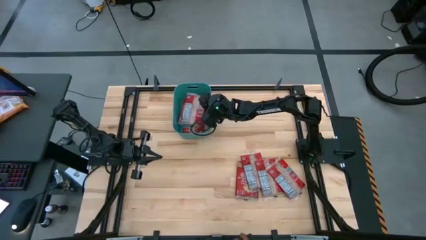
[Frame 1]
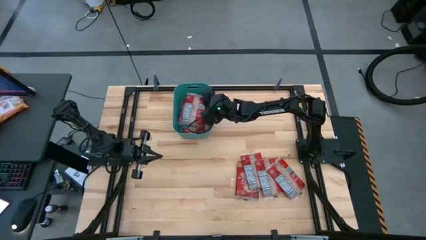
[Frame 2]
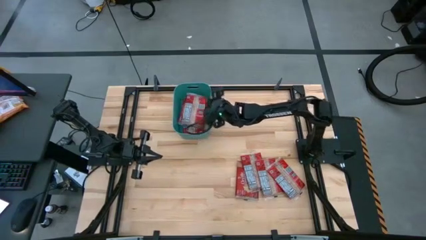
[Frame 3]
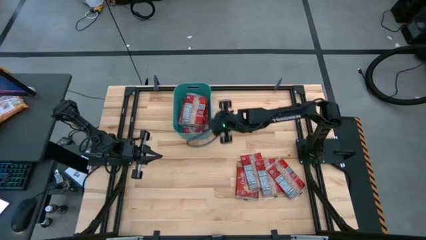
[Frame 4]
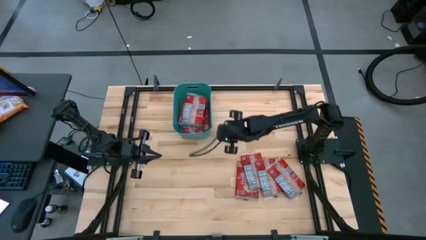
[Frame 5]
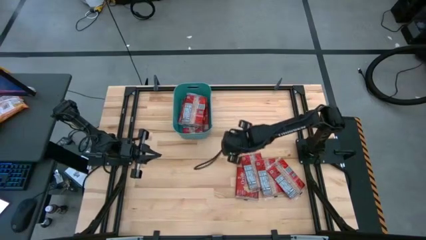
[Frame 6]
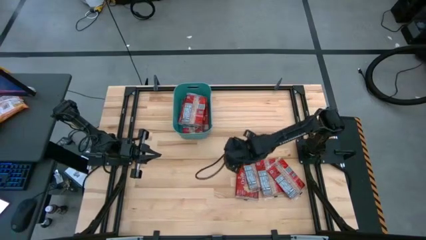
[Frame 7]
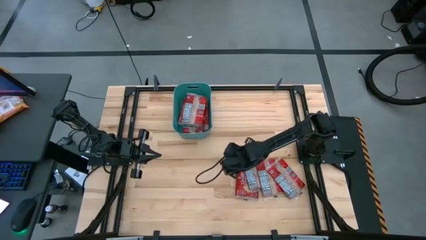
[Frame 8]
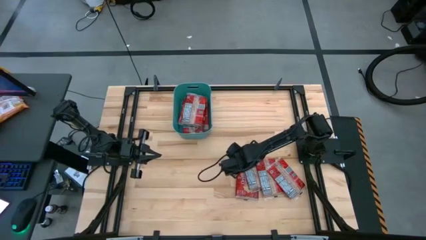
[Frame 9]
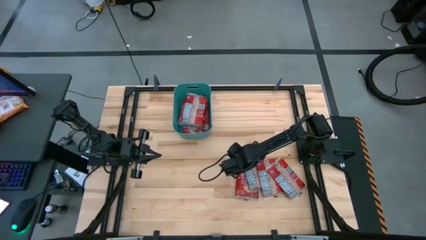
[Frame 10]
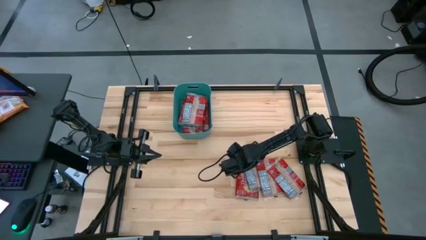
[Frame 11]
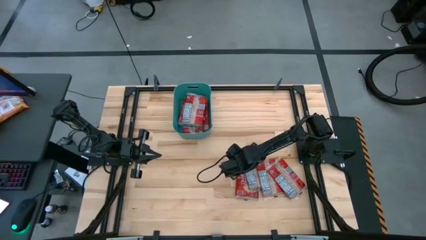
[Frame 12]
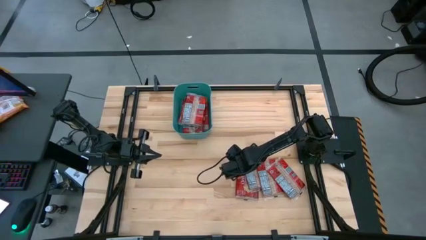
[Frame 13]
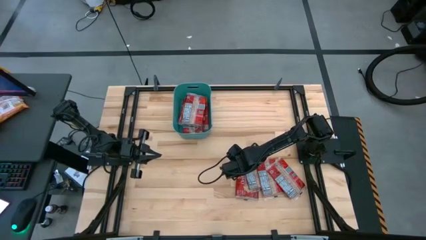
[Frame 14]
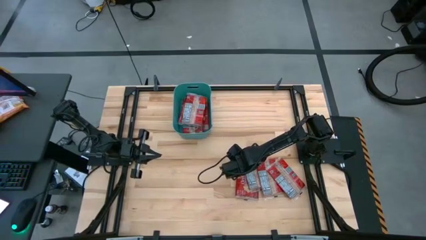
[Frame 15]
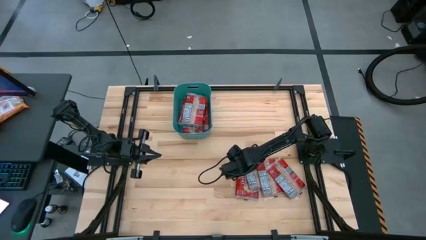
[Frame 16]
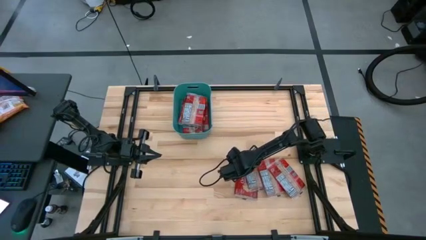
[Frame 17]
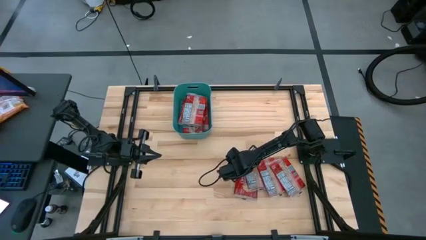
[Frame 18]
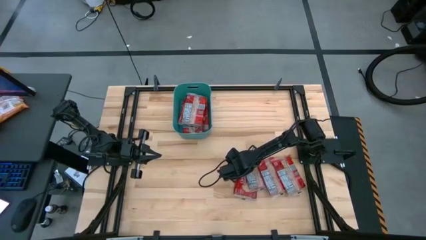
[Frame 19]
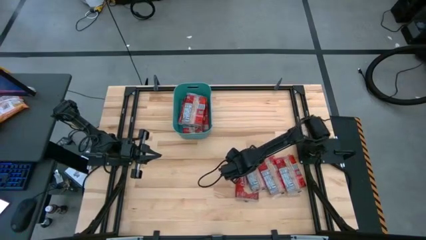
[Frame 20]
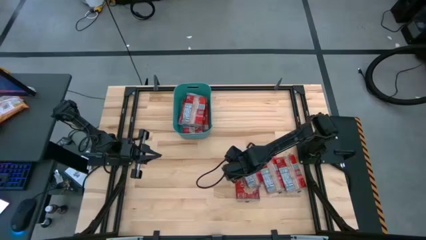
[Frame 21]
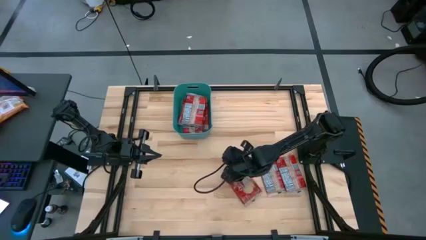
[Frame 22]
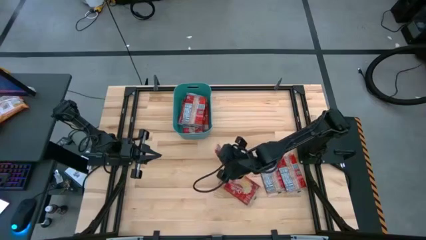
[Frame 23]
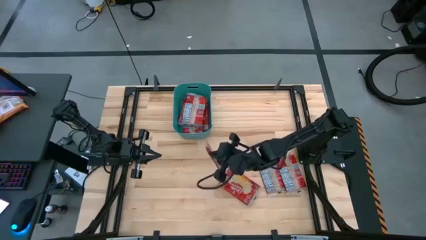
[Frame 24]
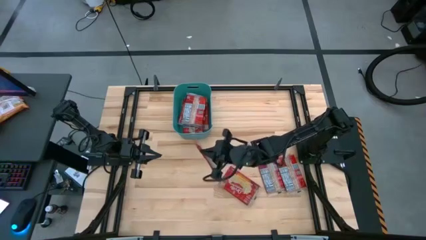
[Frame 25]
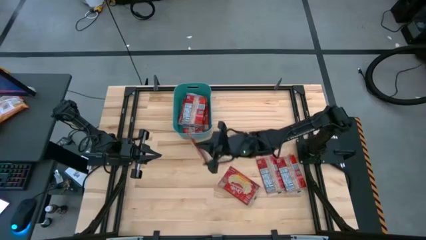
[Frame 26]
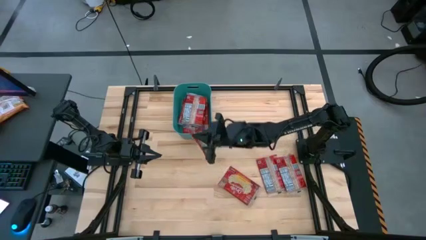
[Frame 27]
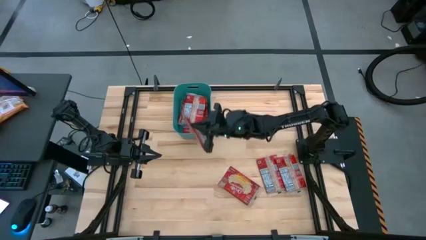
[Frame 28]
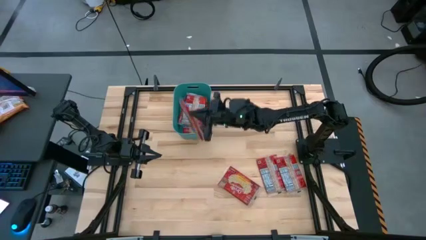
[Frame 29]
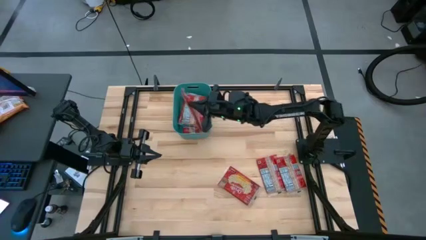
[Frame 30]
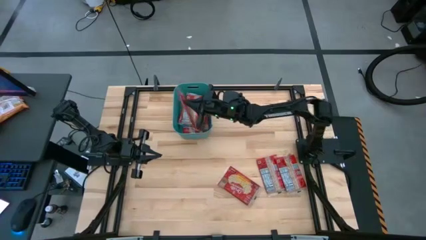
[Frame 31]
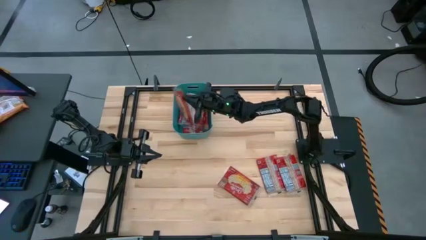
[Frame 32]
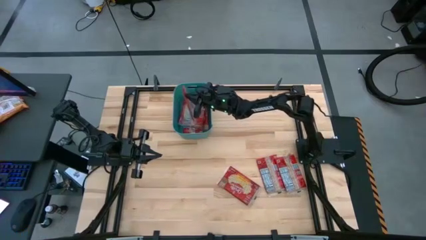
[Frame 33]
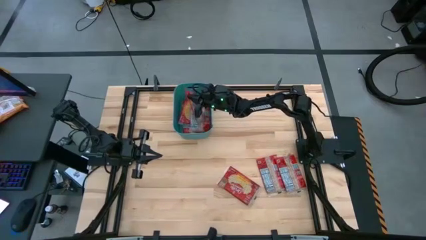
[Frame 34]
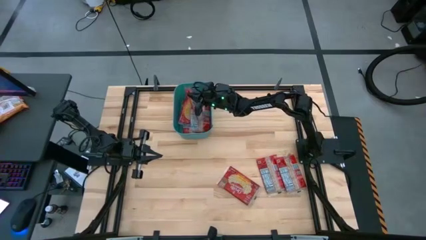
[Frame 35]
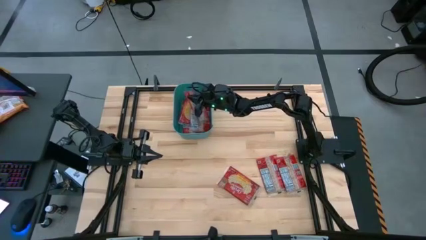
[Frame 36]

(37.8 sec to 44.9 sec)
Task: Sort popcorn bags into baskets
Put the red popcorn bag into the green bin

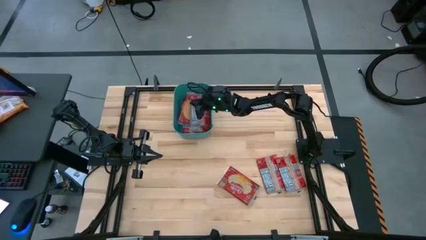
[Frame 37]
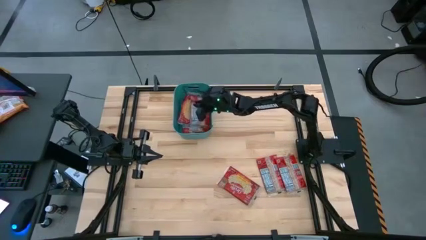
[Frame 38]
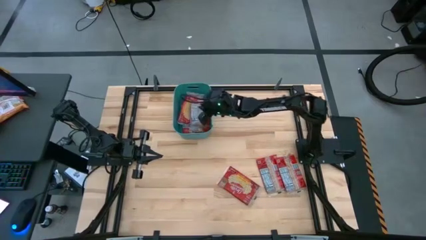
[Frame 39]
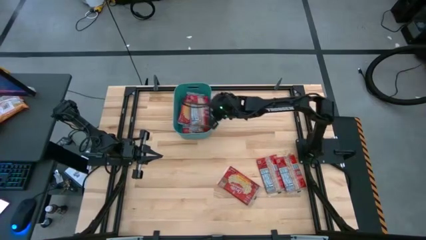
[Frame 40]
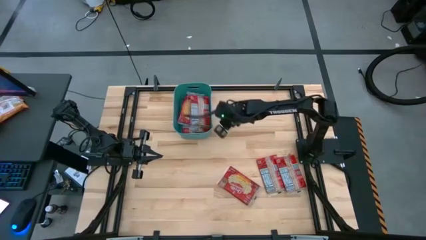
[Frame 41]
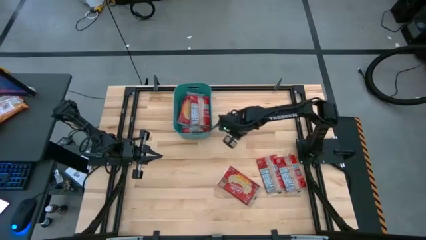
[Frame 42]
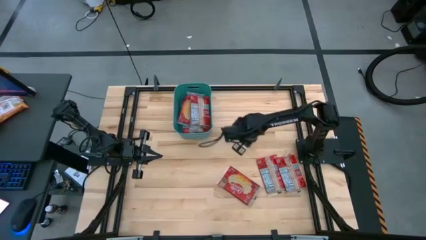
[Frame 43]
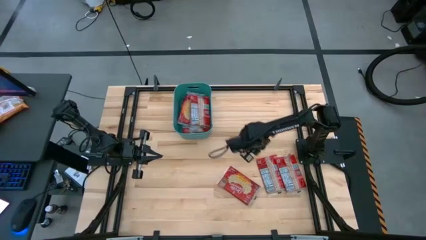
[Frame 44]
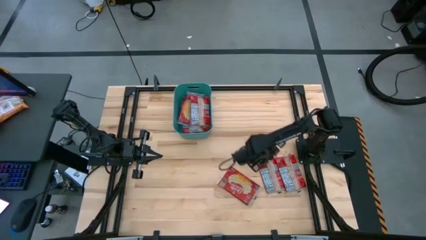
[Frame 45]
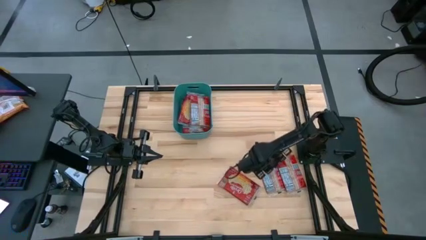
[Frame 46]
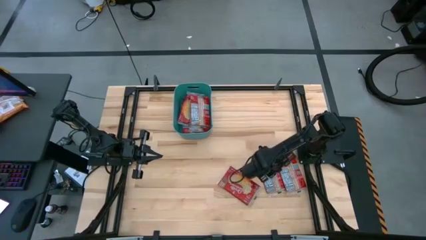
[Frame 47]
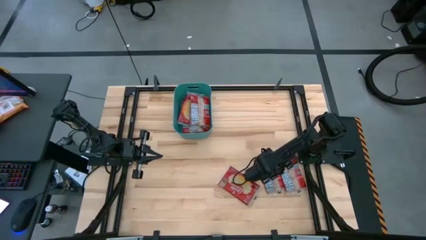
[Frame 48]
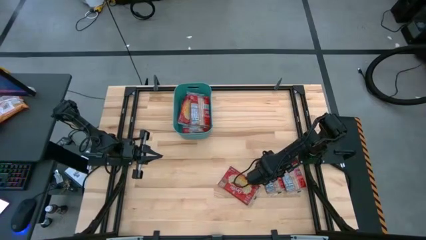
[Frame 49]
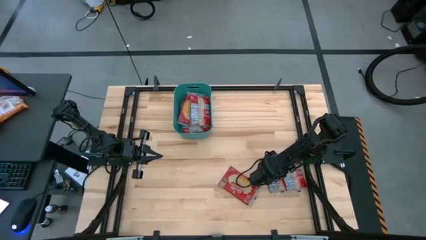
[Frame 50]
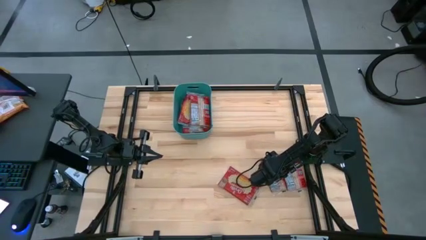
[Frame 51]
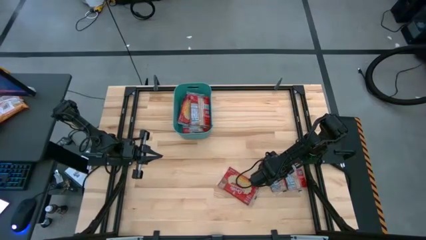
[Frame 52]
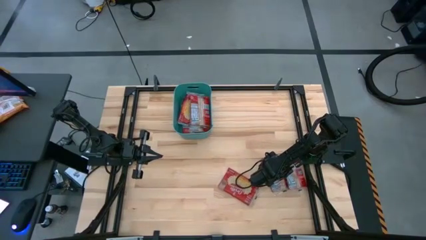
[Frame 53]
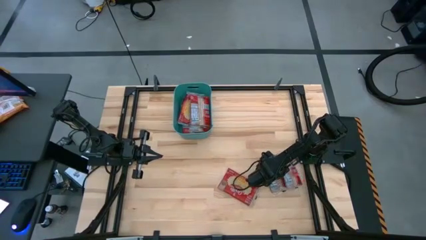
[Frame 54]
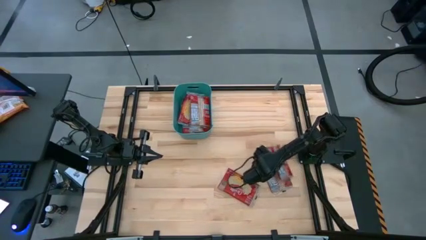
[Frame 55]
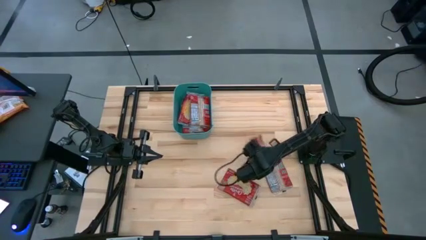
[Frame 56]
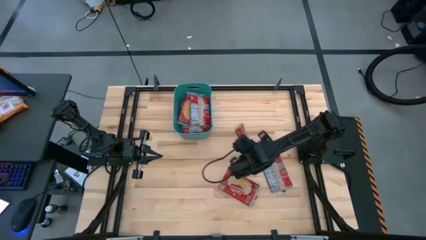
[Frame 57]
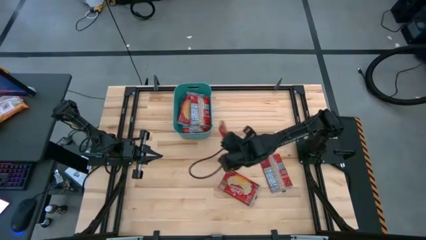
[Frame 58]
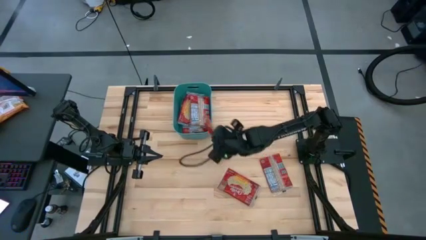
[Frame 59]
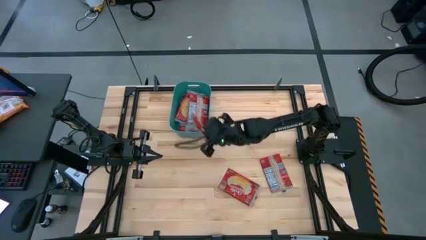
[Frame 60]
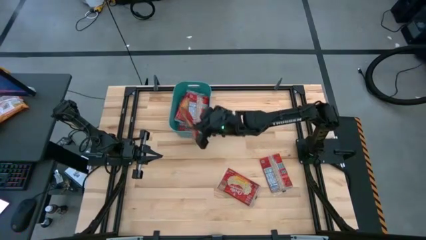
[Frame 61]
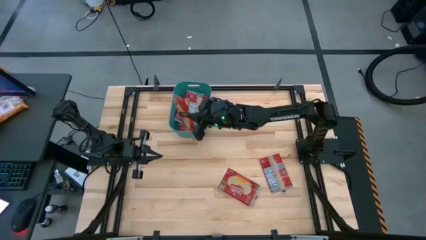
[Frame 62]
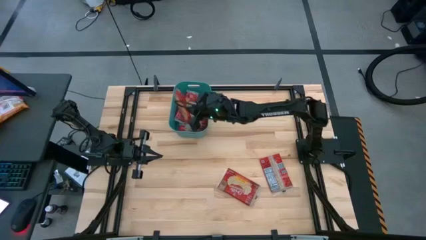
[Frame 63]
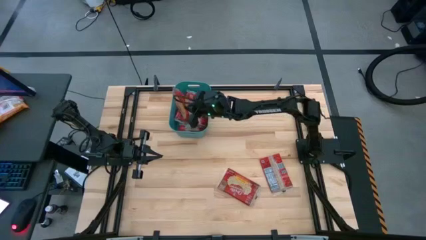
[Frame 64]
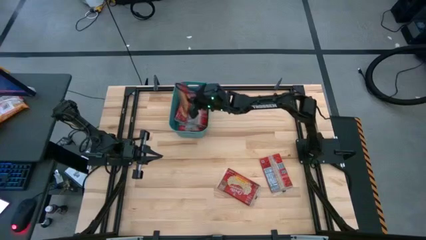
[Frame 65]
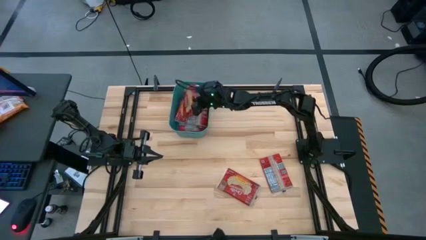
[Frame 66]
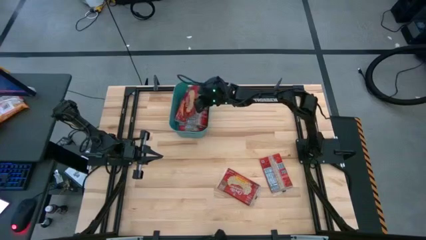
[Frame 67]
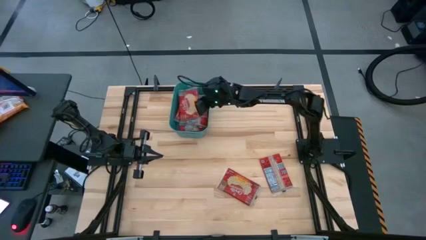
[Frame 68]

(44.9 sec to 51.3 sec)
Put the red popcorn bag into the green bin

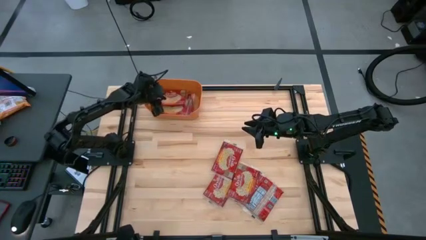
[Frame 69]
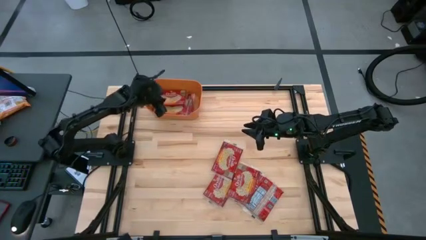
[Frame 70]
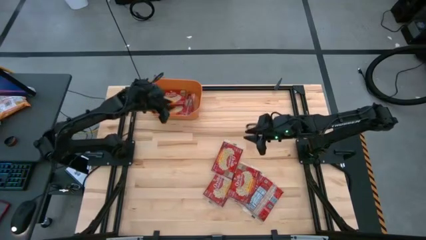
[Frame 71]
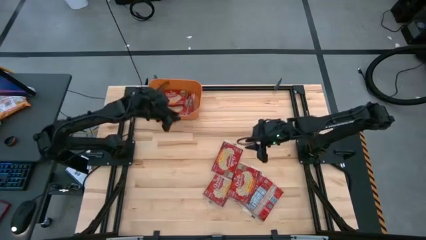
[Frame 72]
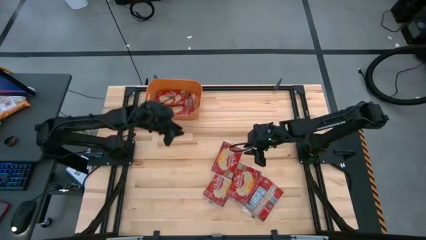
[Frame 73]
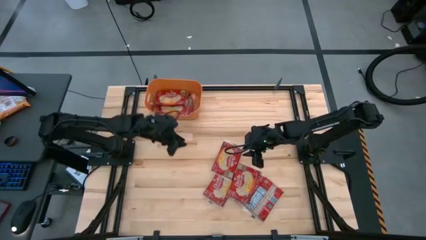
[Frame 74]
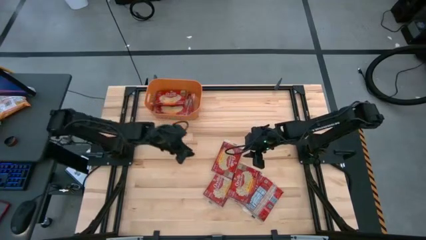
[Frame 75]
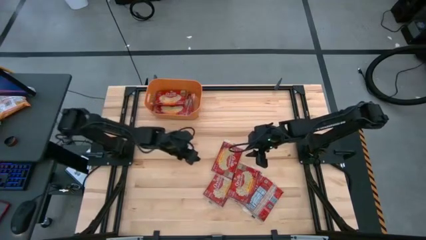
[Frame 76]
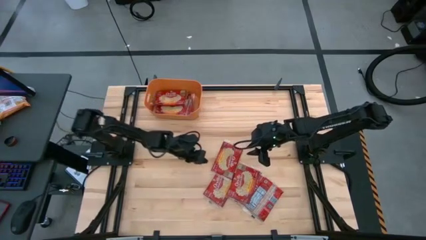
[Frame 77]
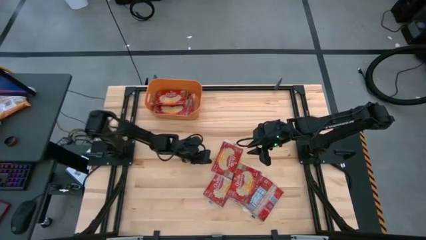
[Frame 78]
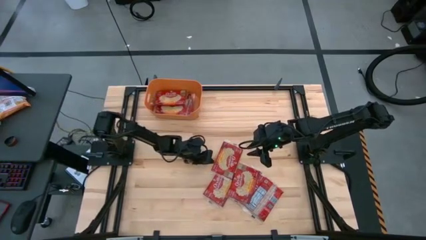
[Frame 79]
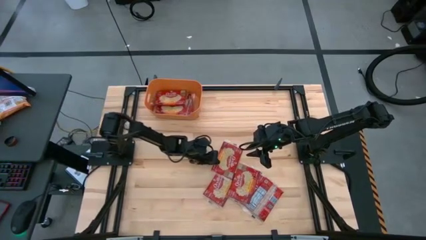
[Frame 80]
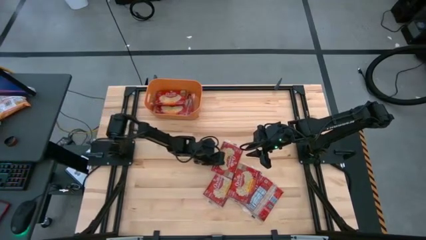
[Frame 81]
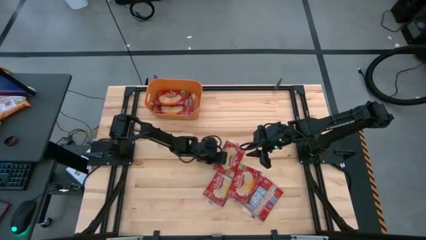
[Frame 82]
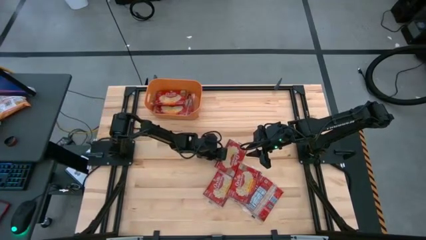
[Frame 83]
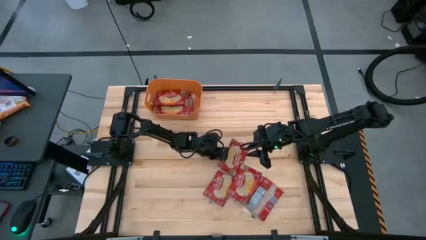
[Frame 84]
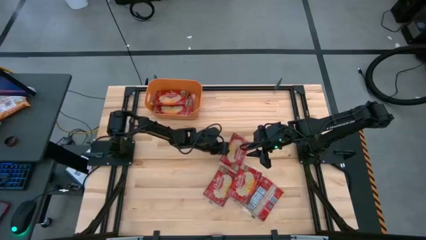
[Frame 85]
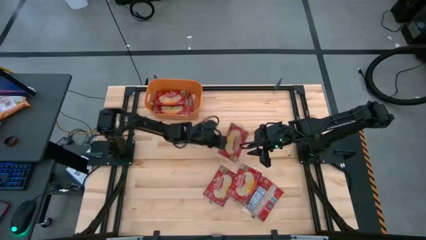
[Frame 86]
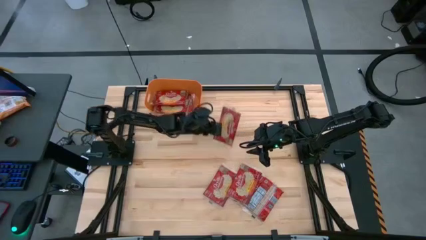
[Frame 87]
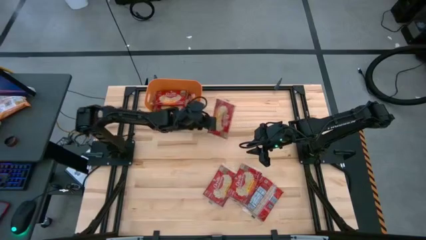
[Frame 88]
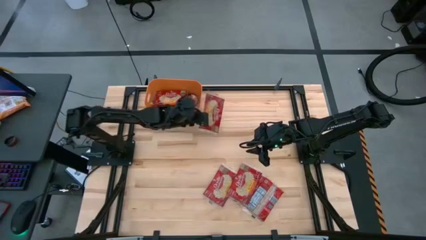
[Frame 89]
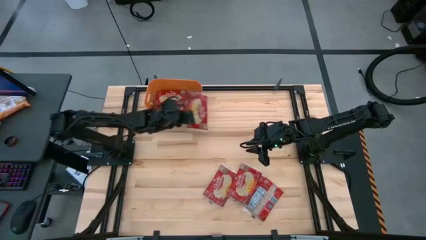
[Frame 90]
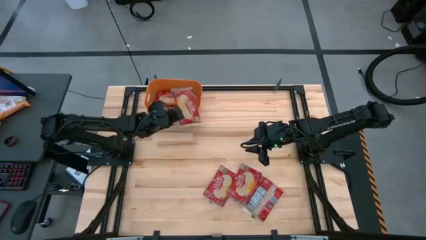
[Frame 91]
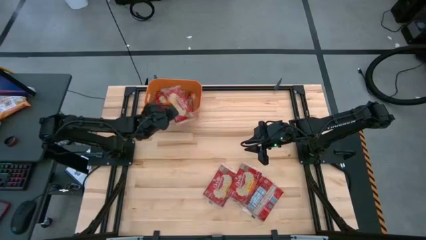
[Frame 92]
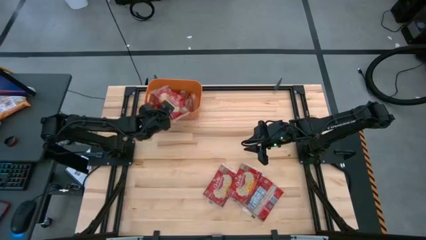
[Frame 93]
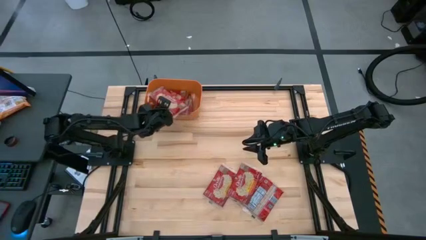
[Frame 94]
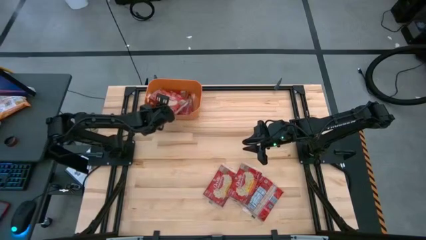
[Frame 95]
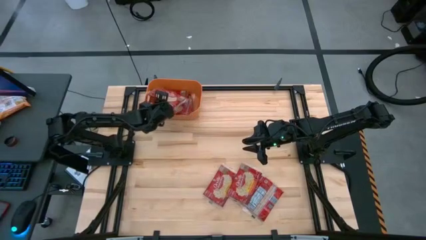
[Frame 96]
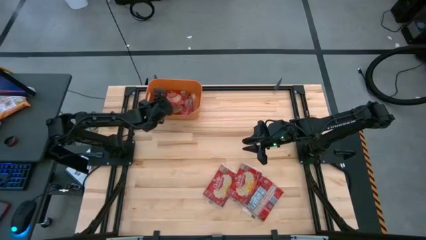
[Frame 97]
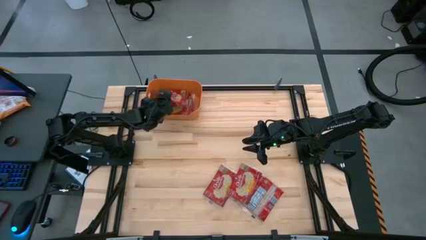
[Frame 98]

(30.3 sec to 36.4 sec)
Task: Sort popcorn bags into baskets
Put the red popcorn bag into the orange bin
